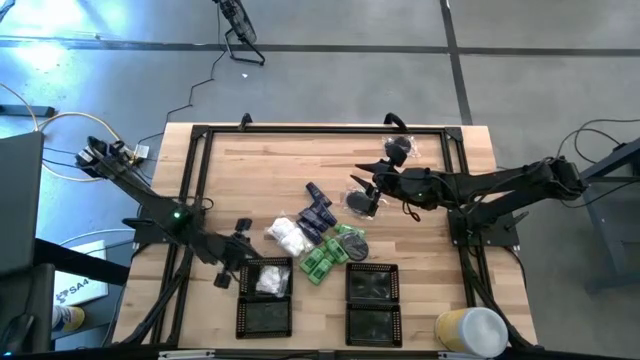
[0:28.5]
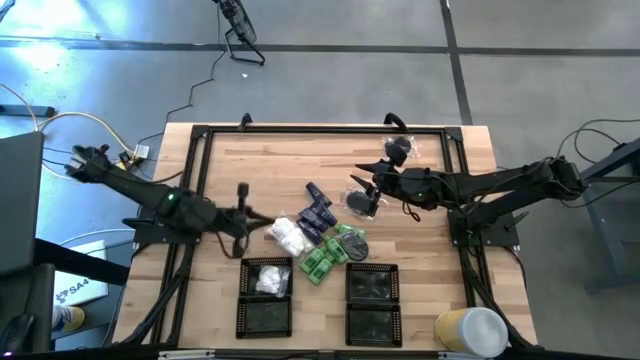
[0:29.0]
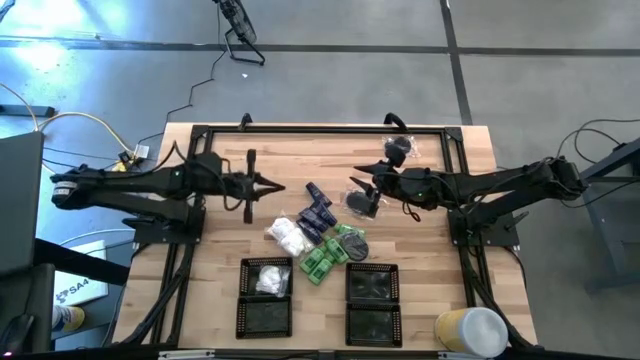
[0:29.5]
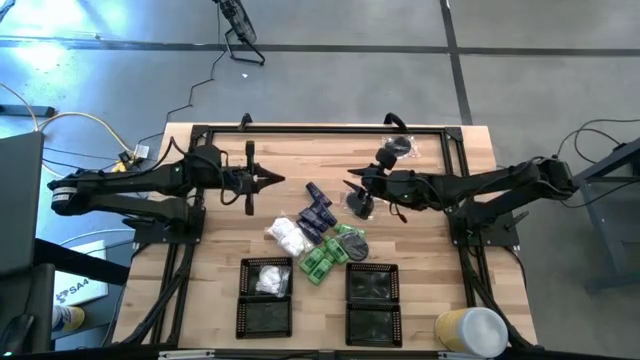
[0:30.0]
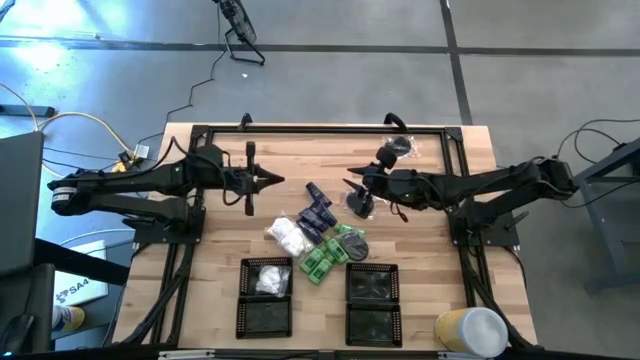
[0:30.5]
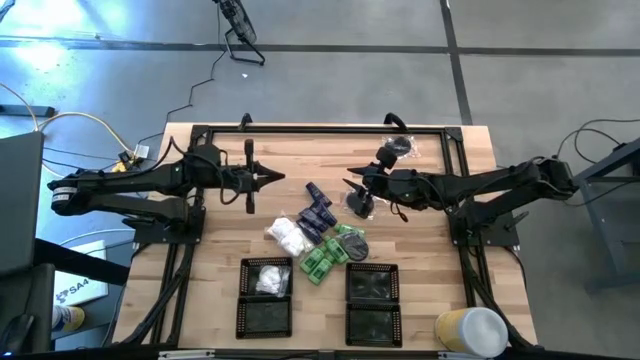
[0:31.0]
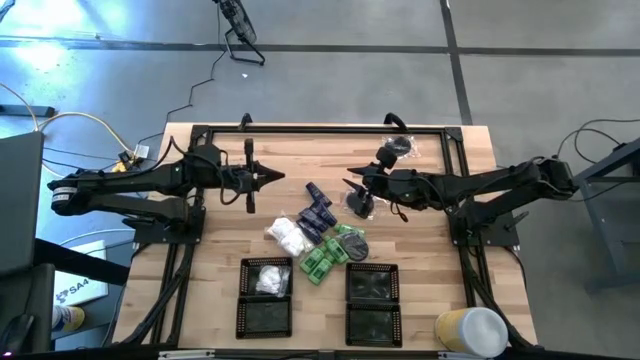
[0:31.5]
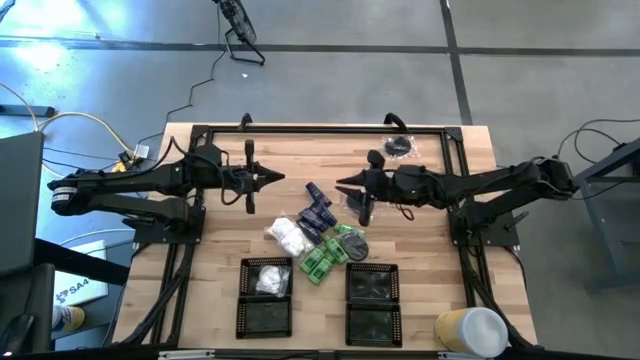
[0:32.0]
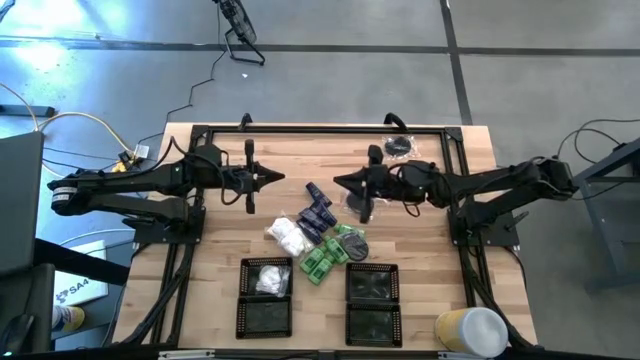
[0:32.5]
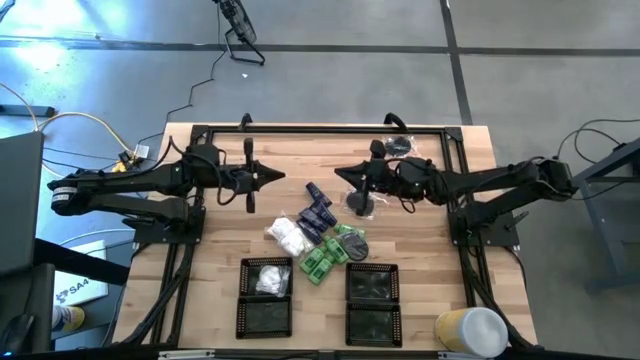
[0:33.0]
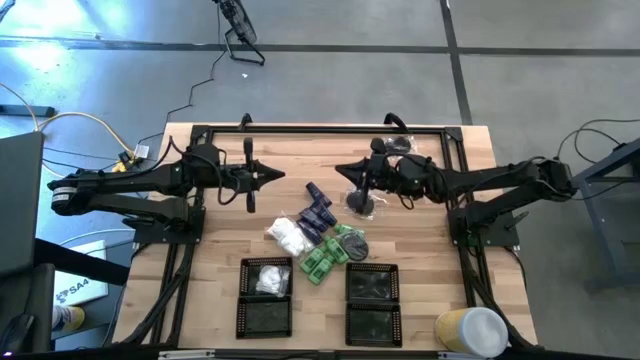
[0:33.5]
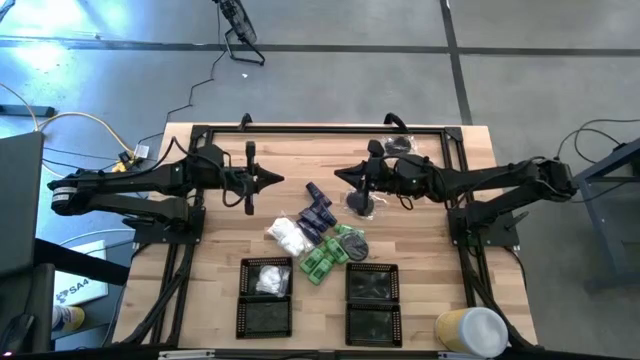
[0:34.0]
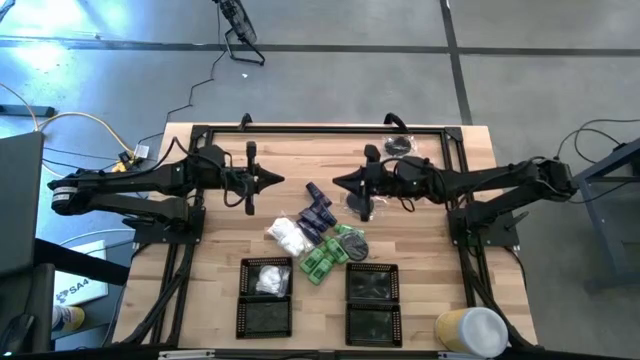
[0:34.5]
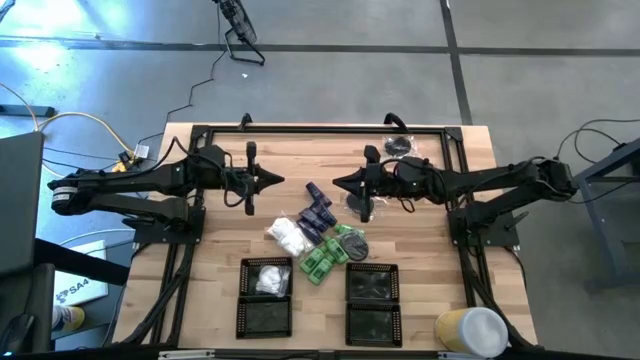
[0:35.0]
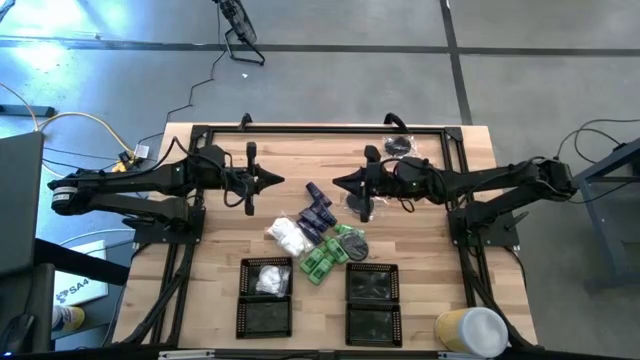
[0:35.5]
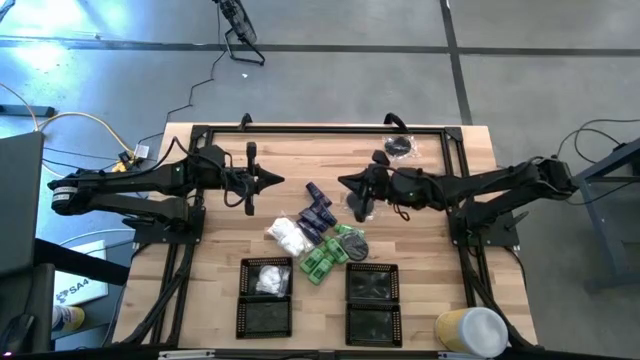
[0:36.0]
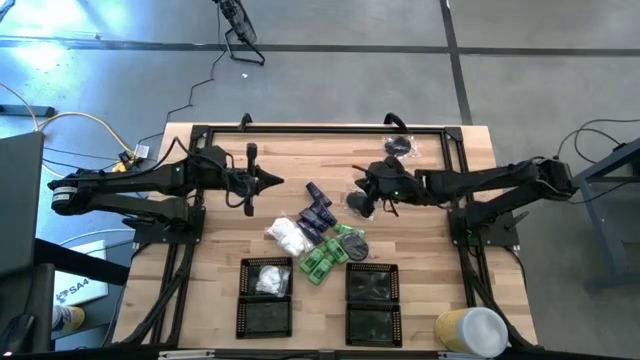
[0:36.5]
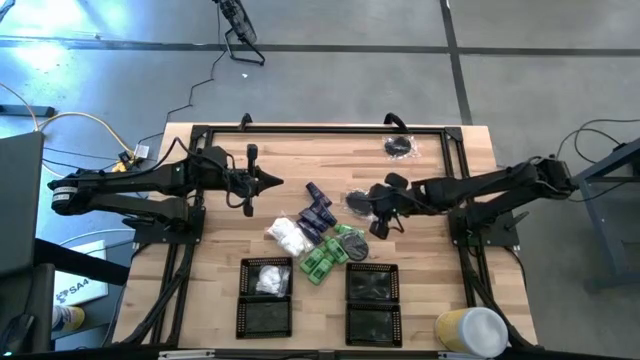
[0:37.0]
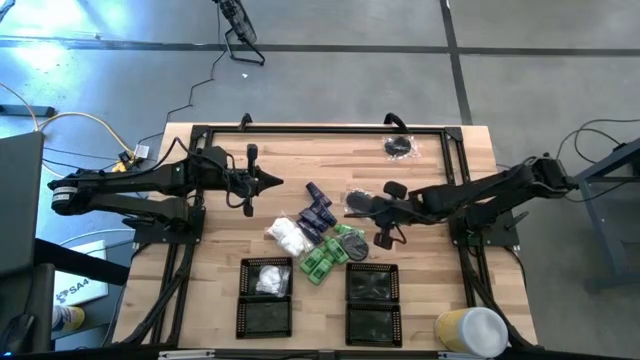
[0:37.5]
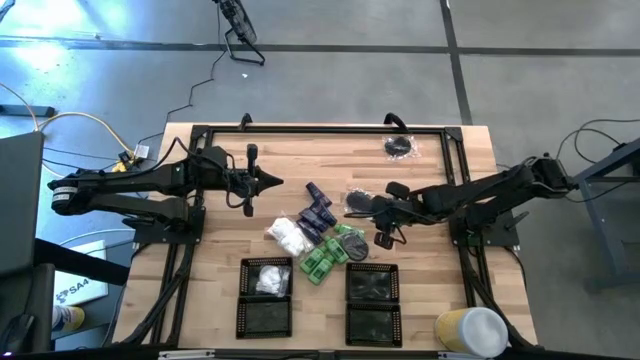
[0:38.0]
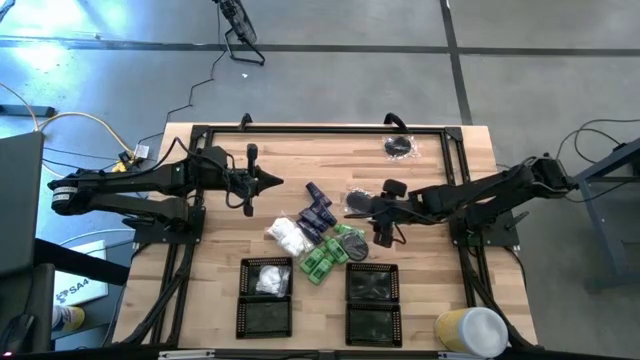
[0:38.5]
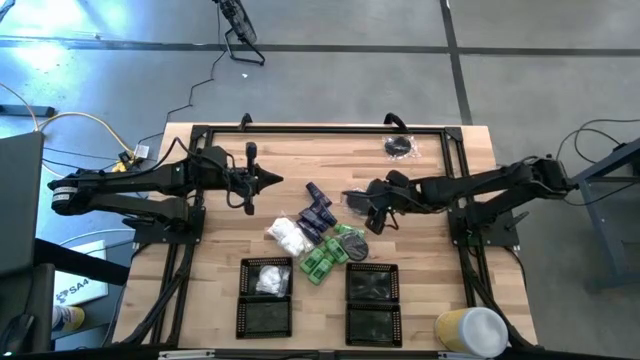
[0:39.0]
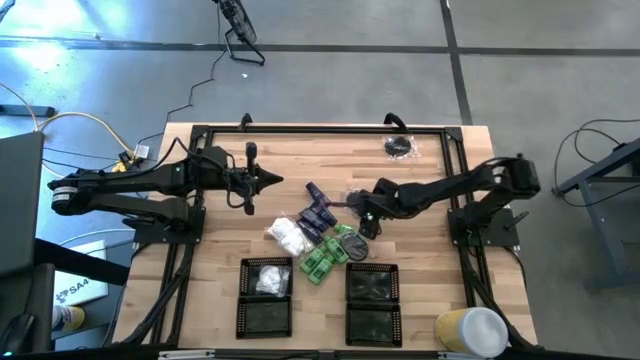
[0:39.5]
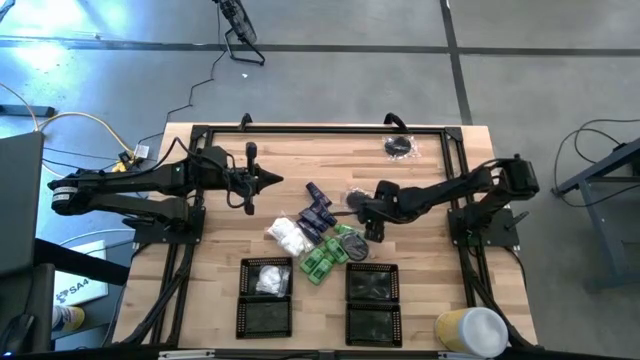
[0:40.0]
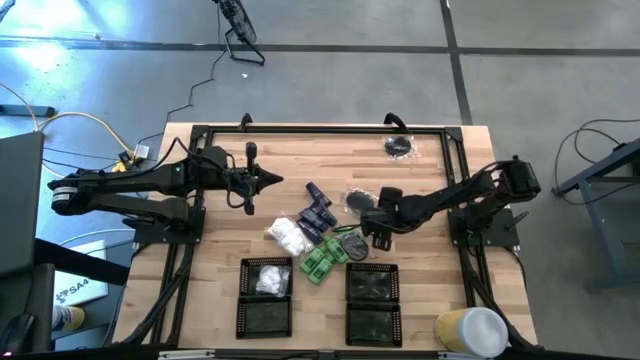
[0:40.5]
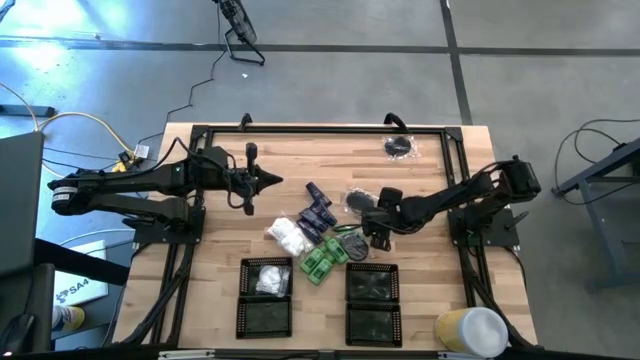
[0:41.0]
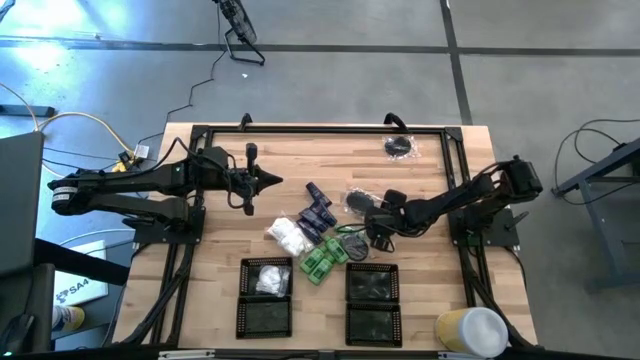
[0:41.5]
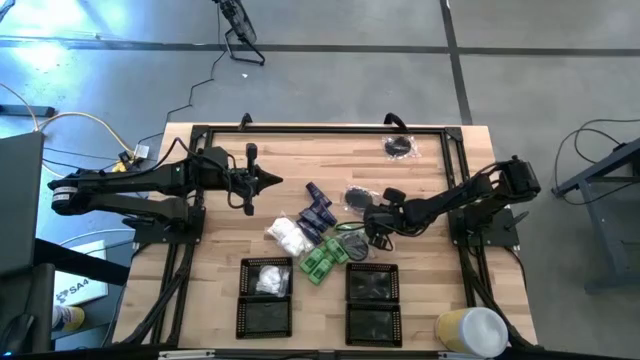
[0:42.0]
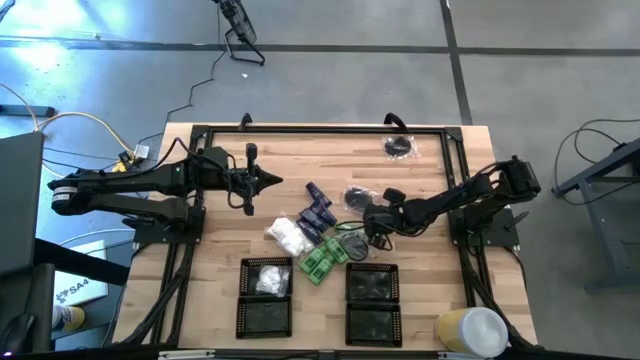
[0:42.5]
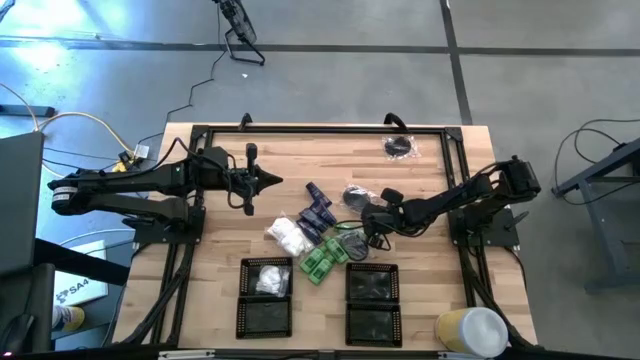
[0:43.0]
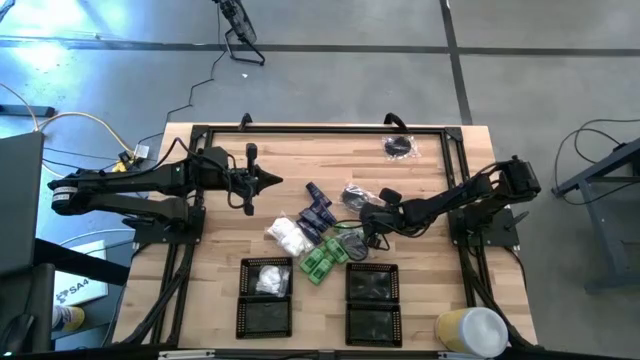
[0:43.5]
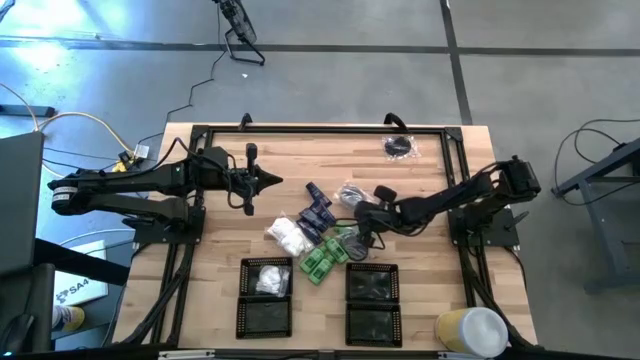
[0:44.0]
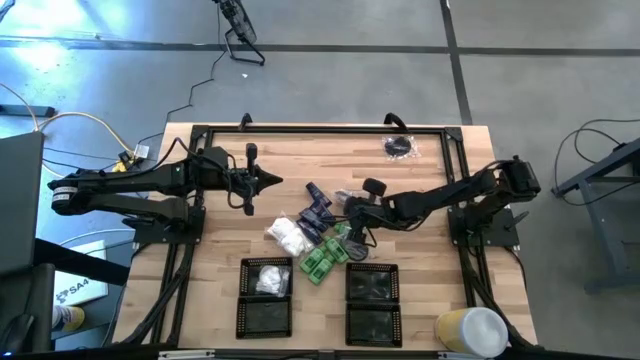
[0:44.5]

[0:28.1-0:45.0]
Task: Pick & Place Travel size toiletries
Put the black hairbrush into the top right black bin

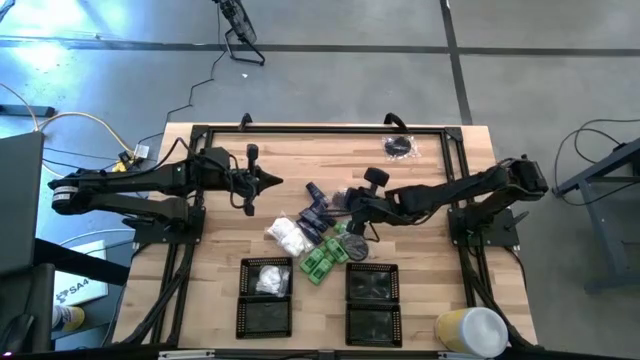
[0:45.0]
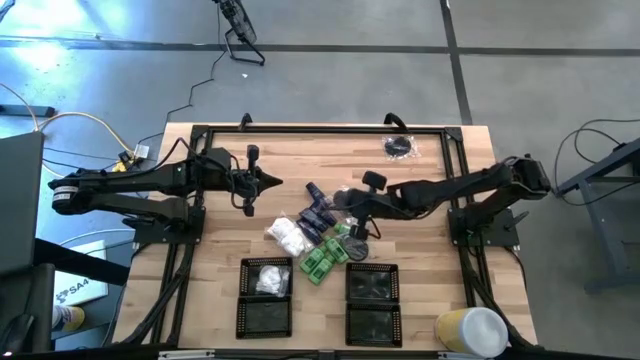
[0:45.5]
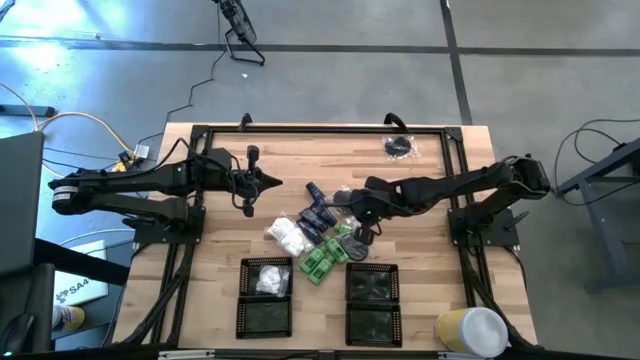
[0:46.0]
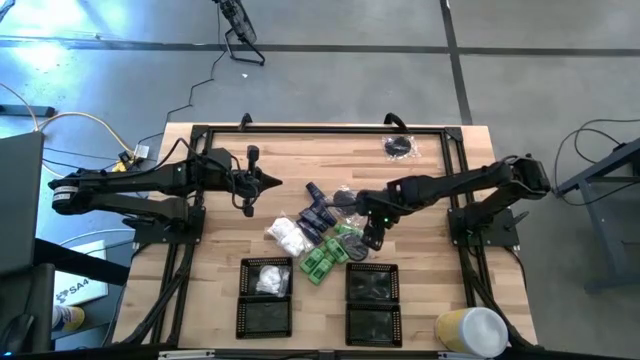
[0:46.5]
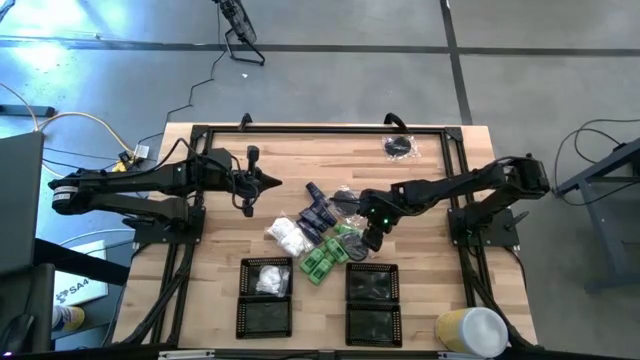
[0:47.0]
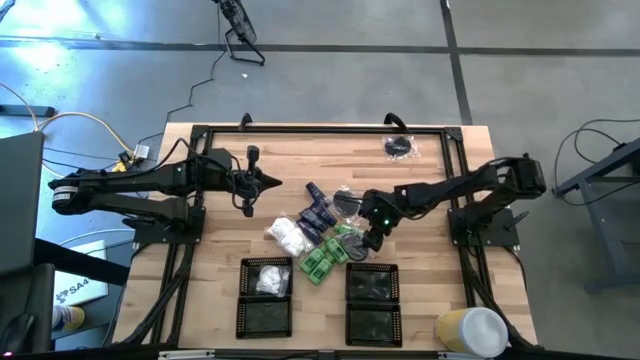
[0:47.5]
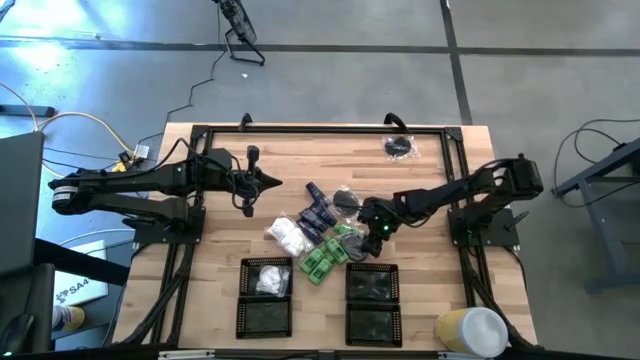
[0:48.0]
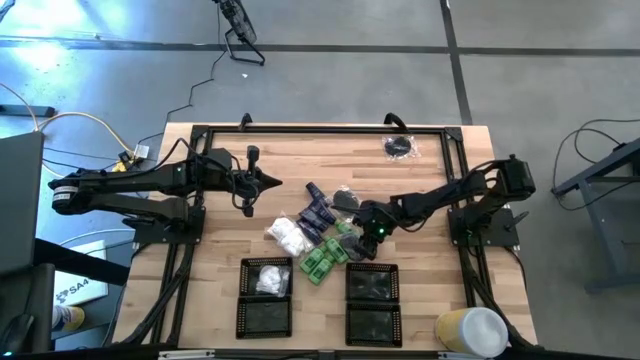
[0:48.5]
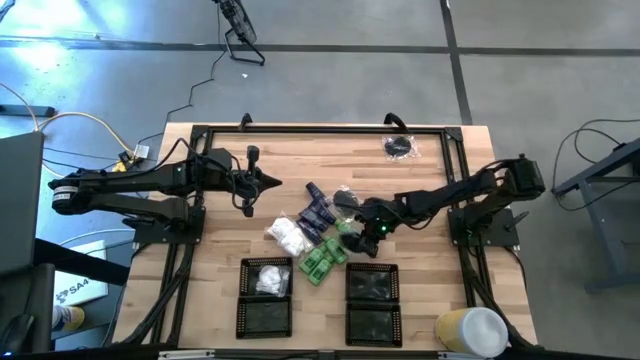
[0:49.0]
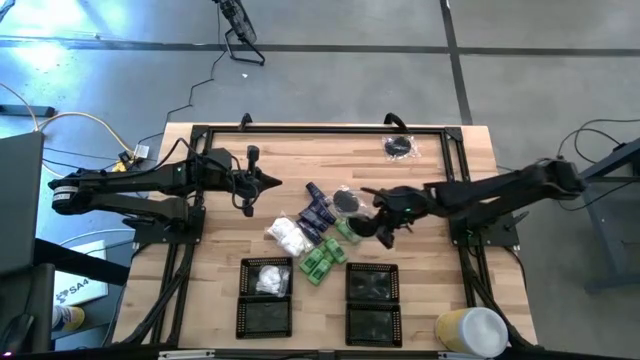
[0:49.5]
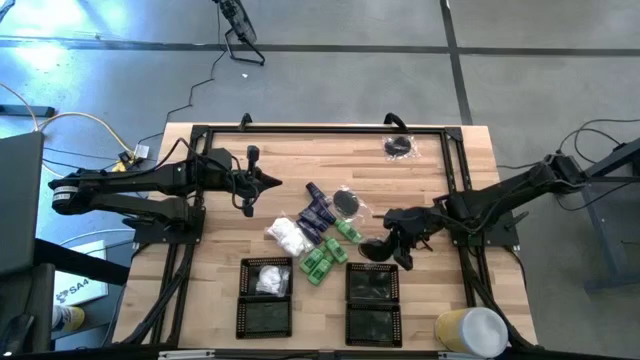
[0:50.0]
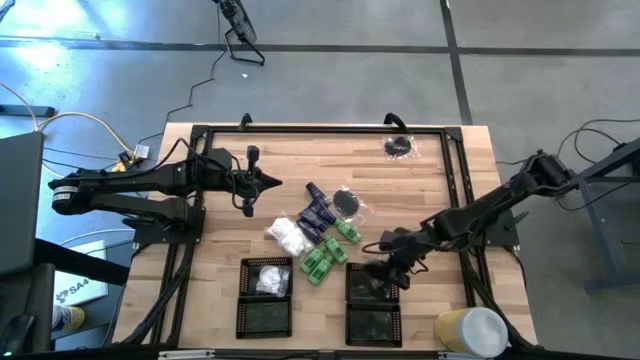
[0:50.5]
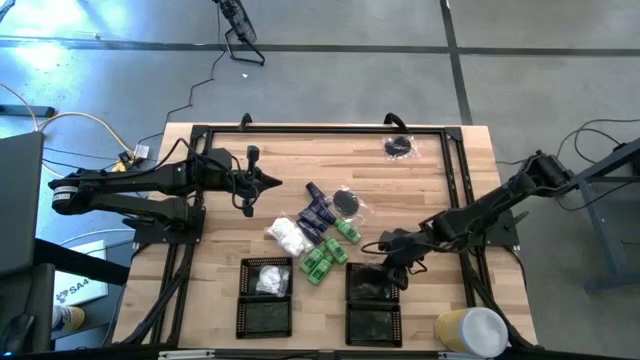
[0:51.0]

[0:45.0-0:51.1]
Put the black hairbrush into the top right black bin
